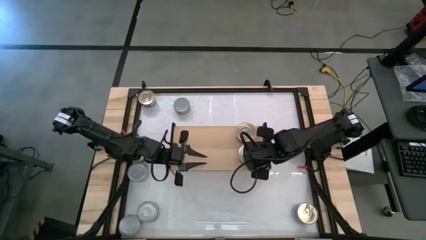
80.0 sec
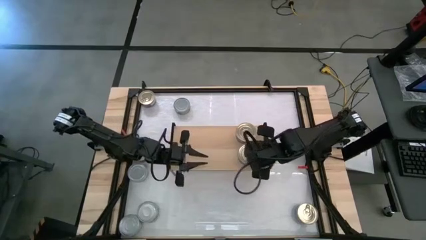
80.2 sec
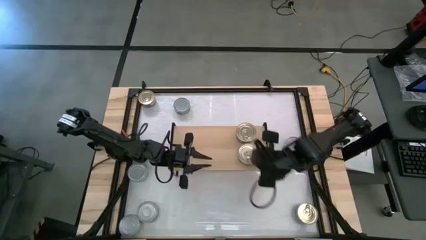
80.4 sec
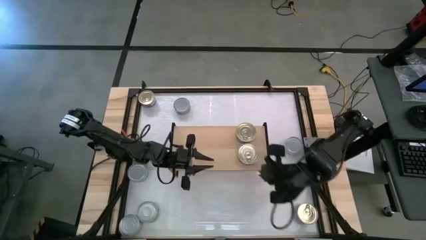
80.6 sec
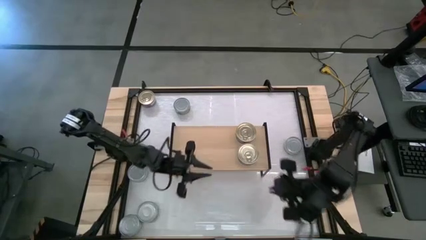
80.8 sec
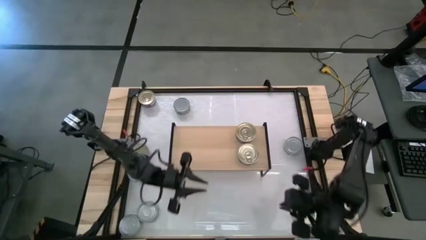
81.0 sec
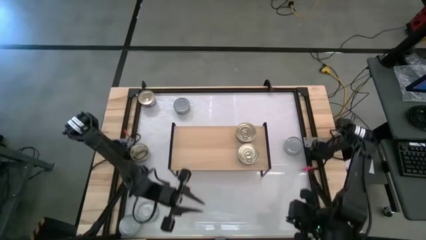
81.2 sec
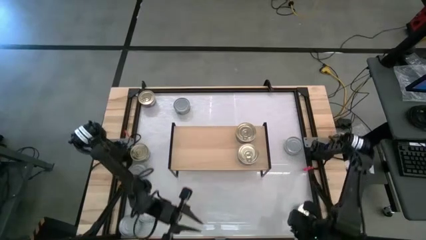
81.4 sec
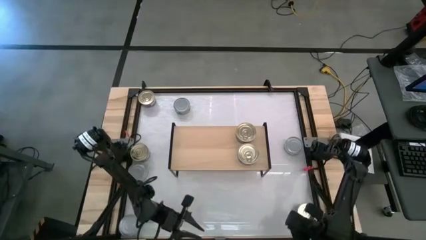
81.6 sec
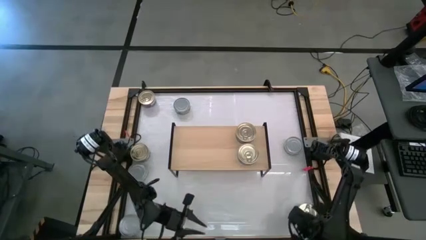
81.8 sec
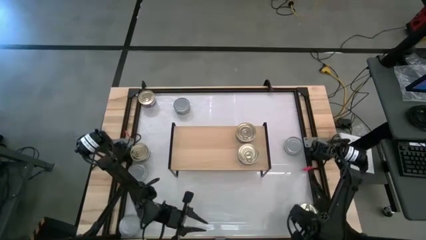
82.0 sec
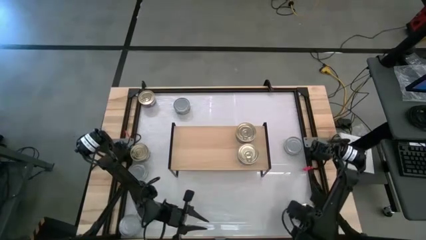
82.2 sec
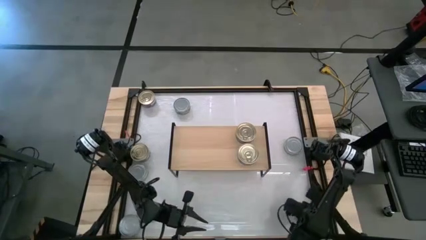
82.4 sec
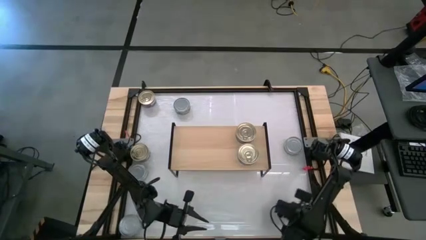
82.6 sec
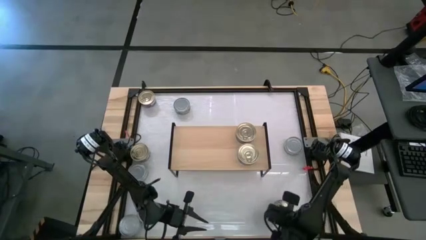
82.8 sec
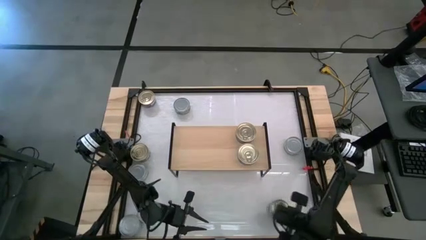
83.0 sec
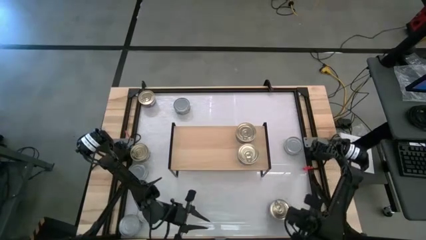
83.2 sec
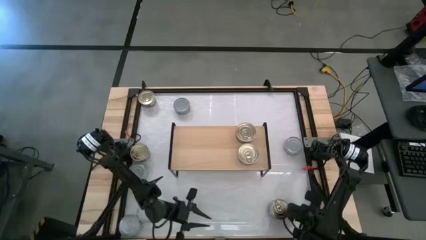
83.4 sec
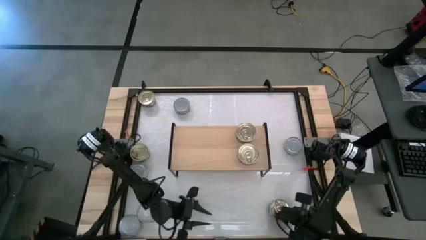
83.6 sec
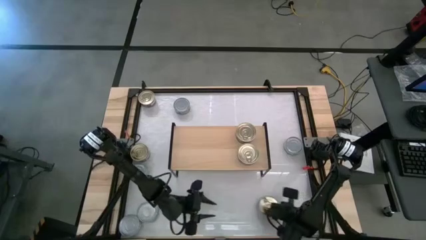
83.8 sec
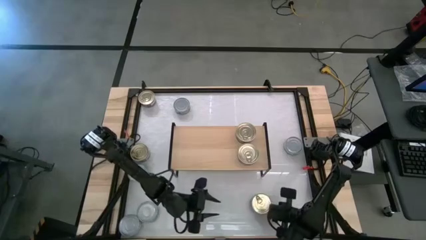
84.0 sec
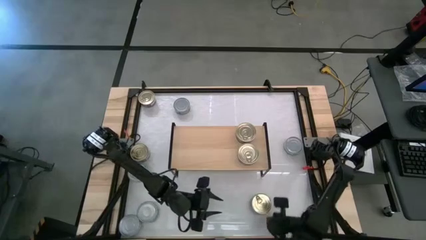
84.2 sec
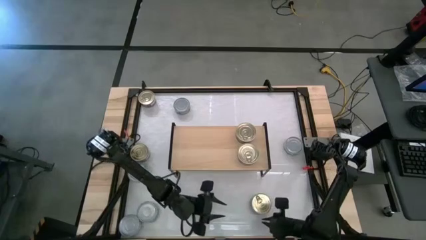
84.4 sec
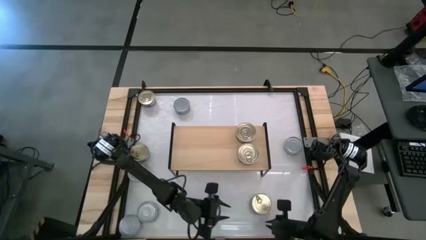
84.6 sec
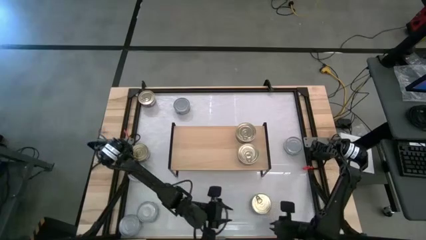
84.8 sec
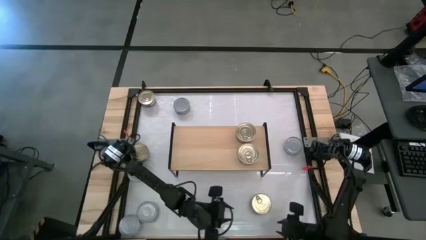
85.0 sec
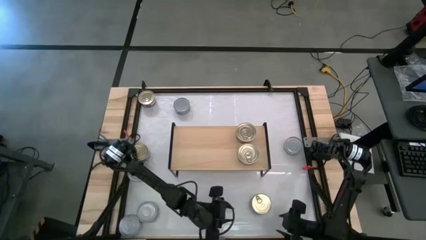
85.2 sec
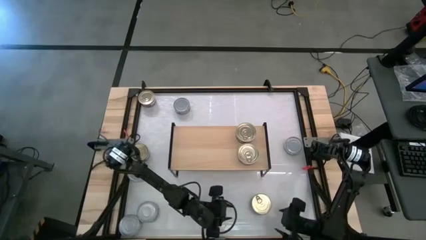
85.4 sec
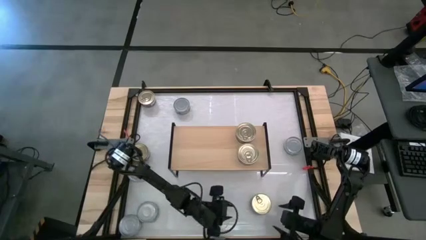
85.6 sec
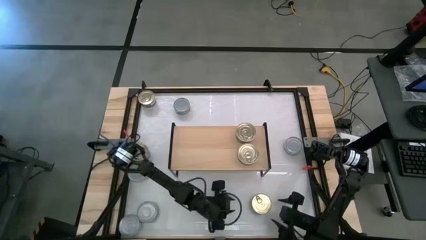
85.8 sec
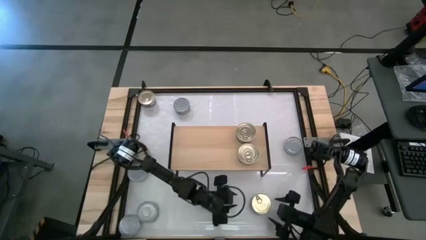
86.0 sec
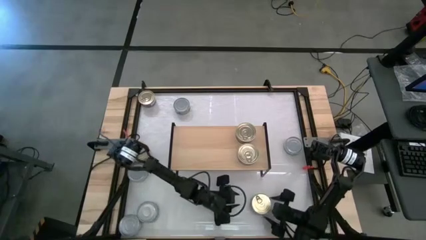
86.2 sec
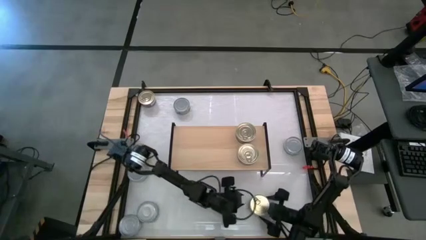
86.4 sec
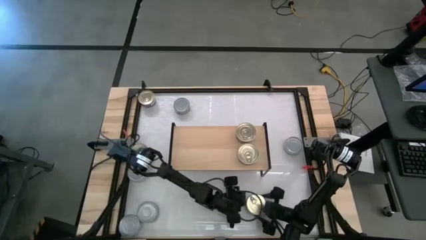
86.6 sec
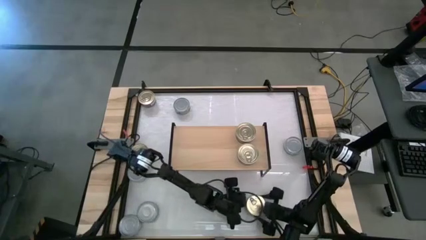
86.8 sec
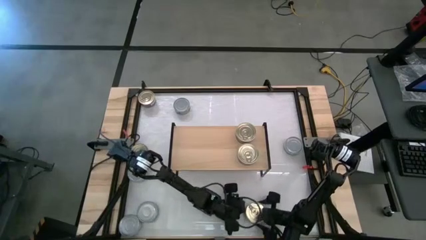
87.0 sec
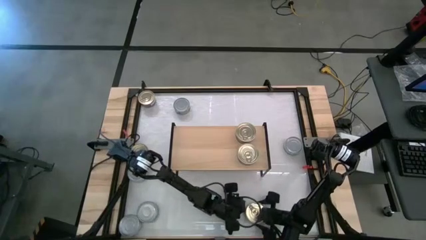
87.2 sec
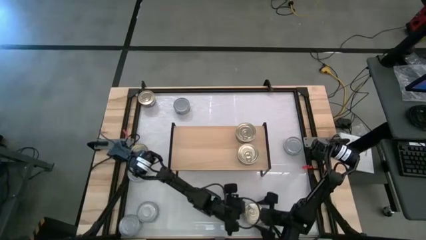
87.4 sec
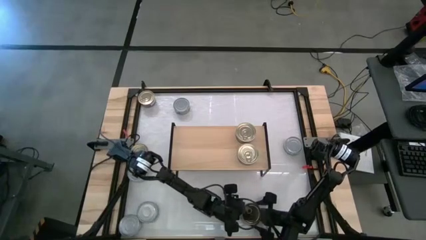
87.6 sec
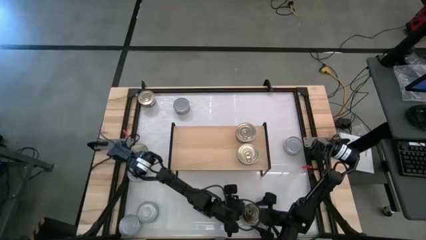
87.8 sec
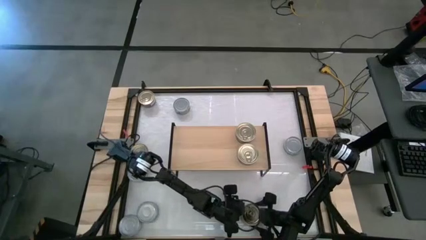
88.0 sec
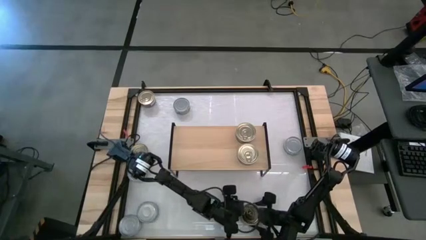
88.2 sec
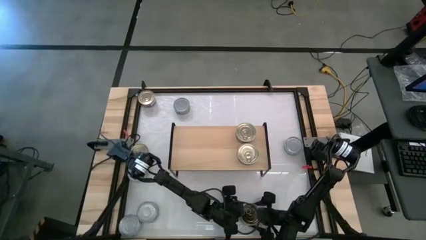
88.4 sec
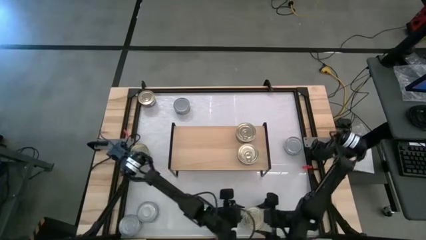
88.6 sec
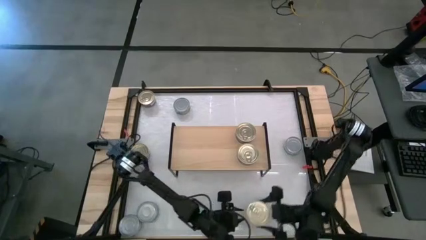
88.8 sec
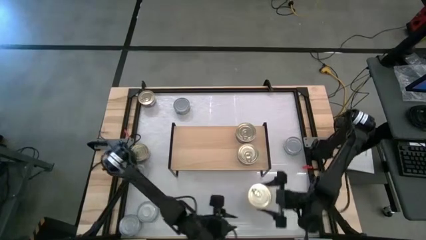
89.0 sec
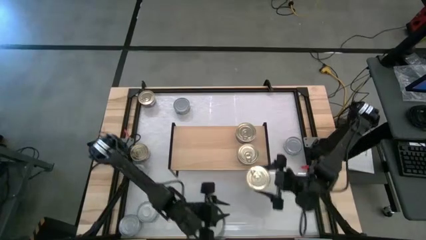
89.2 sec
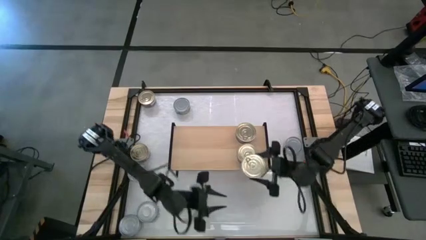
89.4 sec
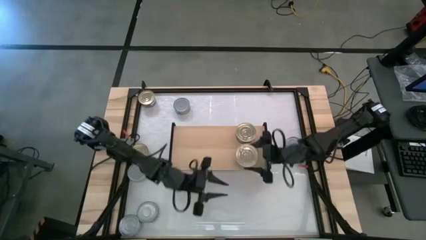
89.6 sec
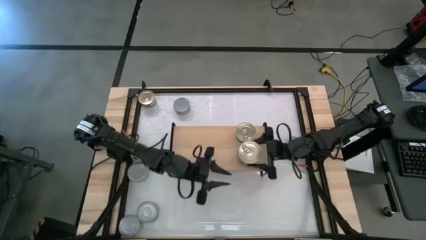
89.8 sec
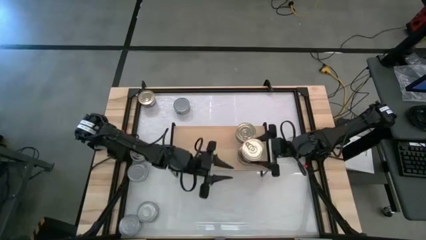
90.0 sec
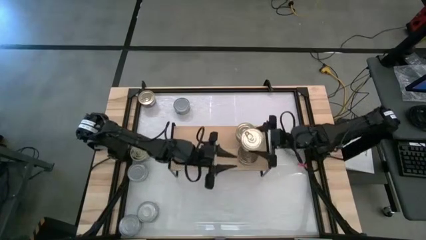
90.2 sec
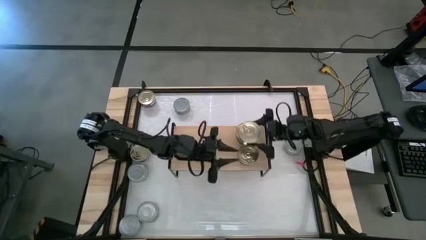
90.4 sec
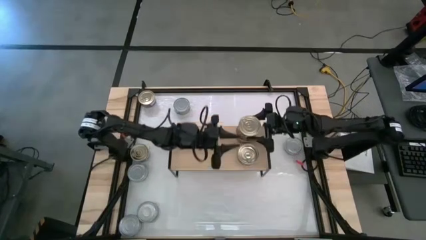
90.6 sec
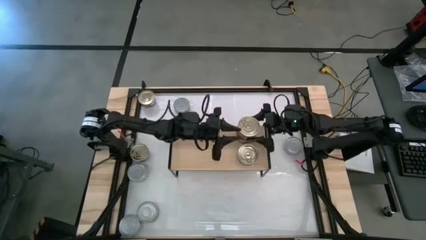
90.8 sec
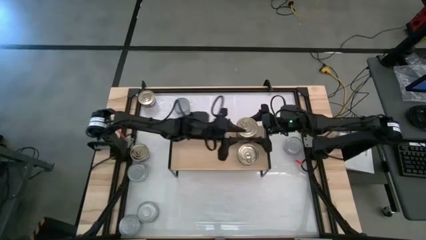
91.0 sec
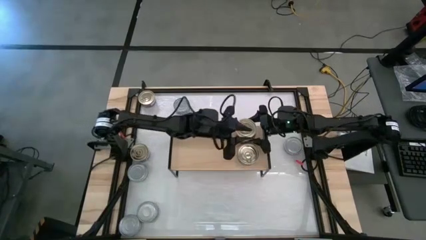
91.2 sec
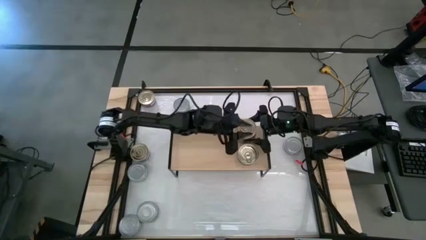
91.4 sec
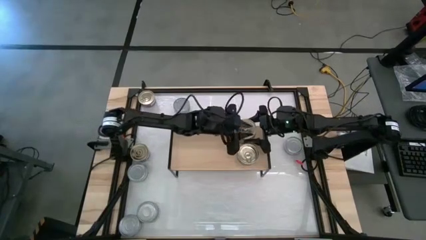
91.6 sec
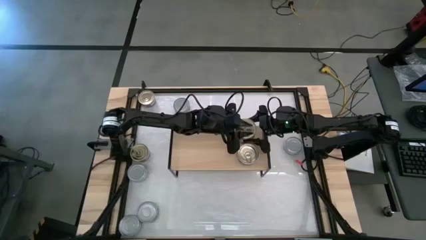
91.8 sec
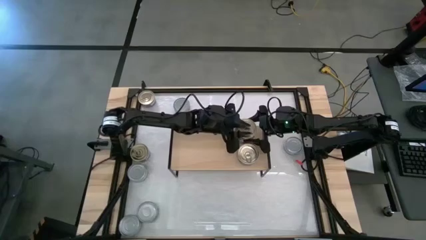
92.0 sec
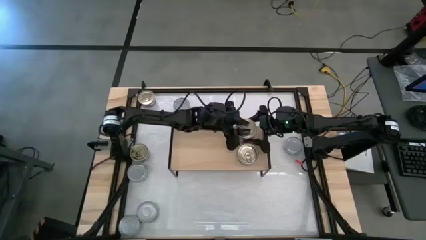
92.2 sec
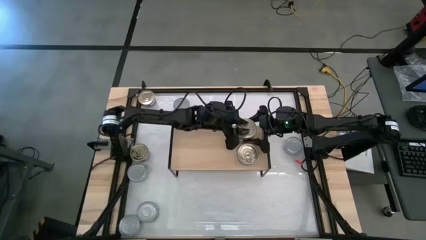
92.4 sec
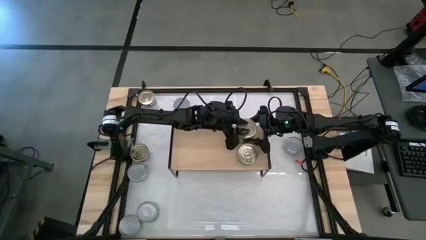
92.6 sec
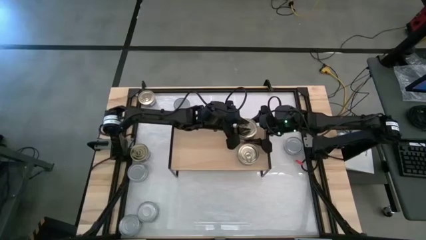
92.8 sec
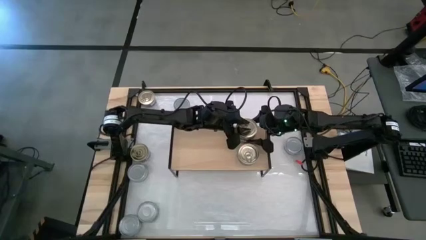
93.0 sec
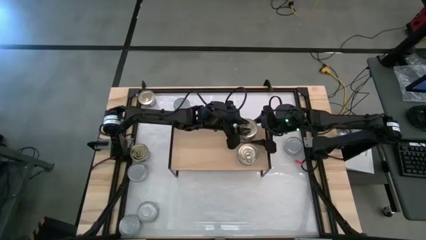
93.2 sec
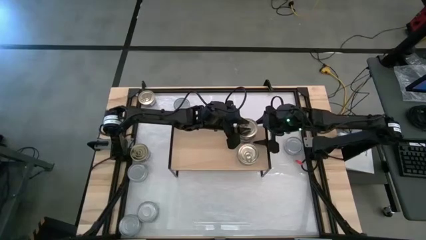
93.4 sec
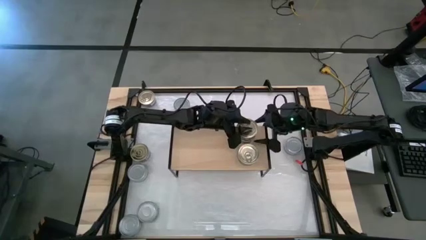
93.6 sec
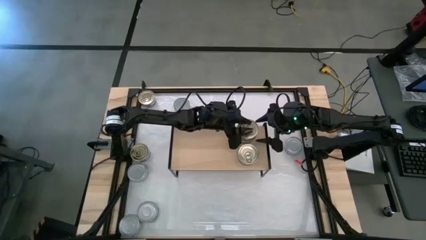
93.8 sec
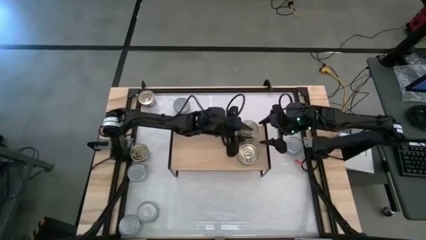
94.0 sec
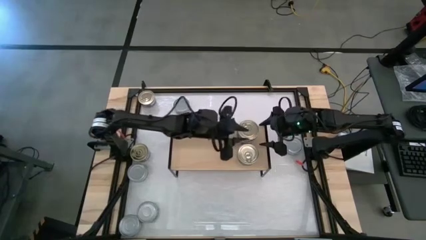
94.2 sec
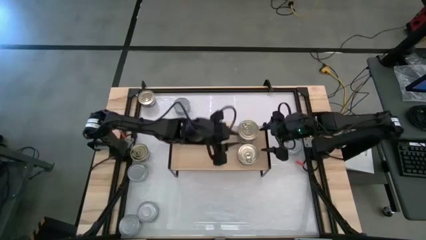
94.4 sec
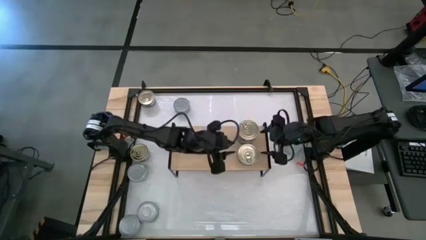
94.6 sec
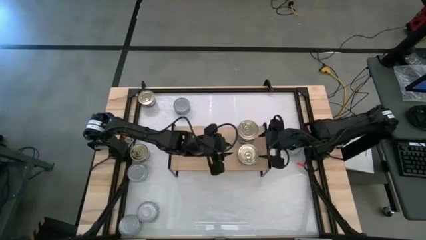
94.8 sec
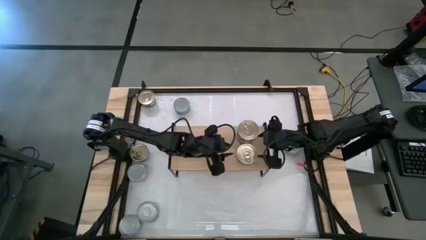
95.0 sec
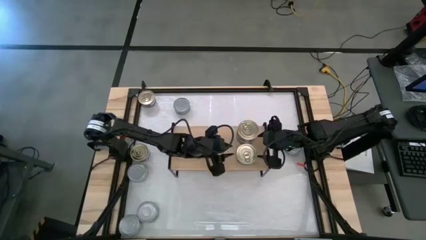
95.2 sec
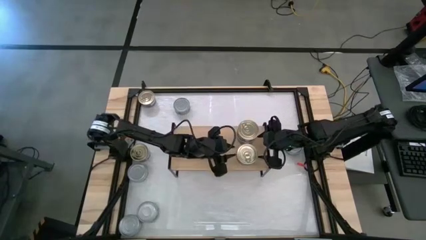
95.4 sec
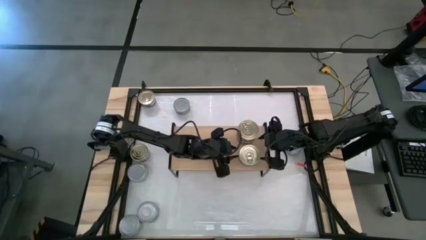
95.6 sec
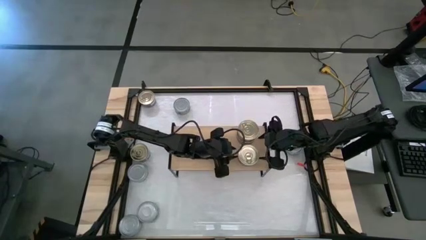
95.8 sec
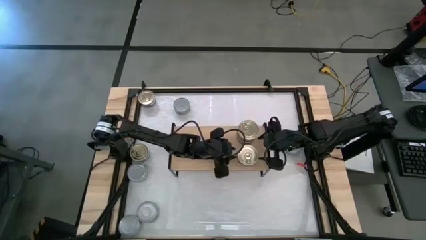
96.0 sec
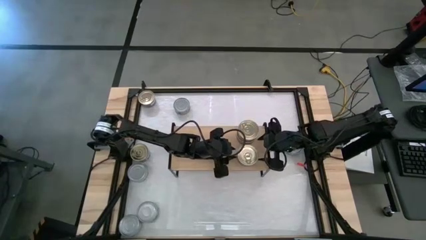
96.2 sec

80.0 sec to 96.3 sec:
Task: Stack canned seafood by type on shelf
Stack the blue and pink tuna can on top of the other blue and pink tuna can on the shelf
